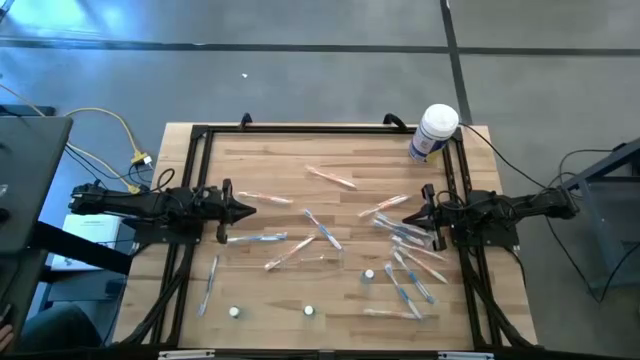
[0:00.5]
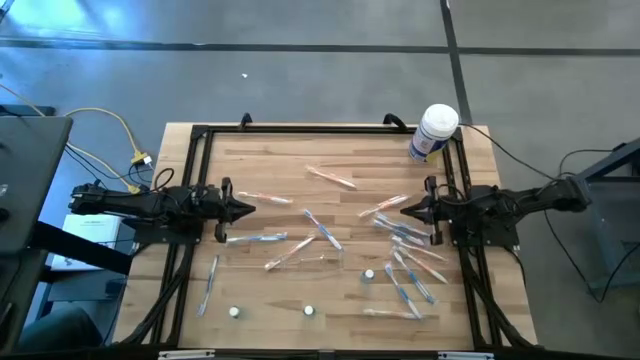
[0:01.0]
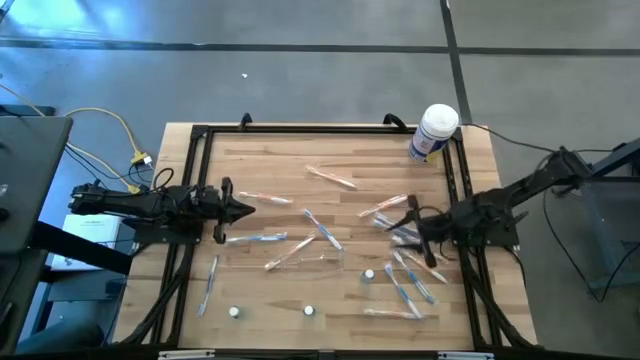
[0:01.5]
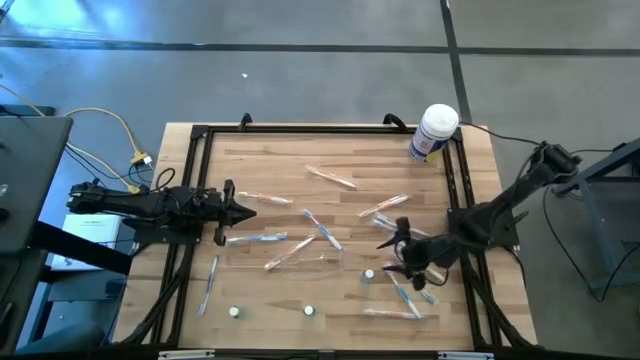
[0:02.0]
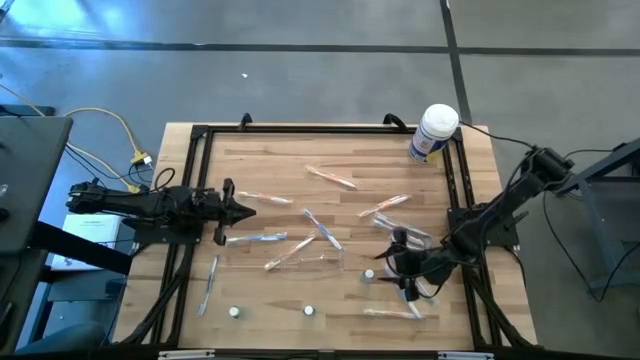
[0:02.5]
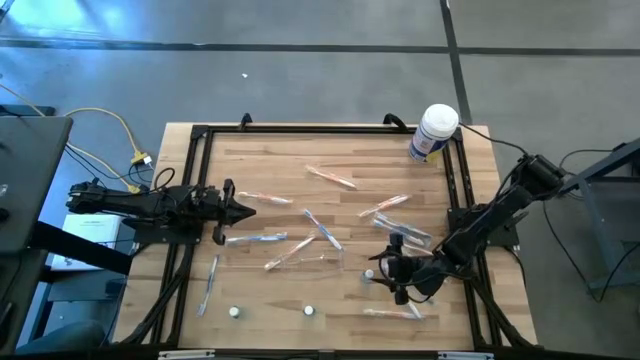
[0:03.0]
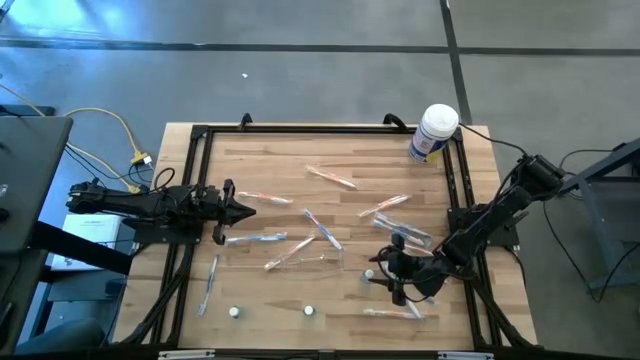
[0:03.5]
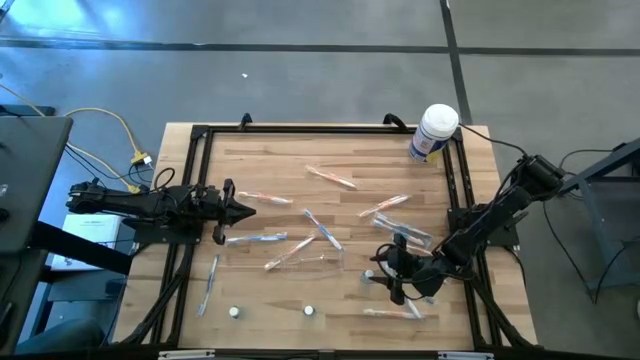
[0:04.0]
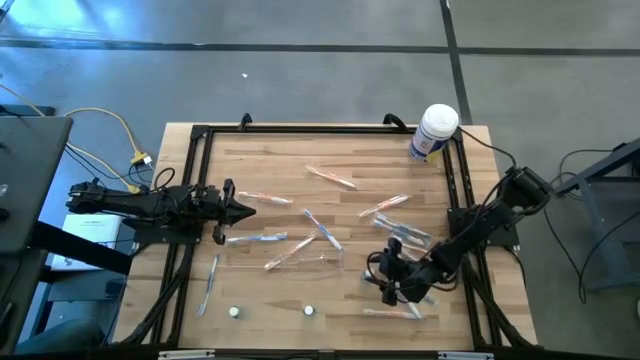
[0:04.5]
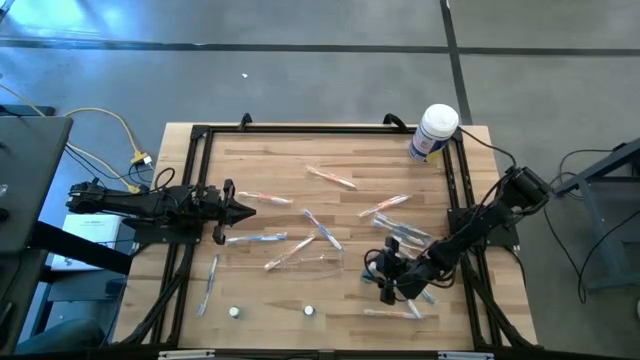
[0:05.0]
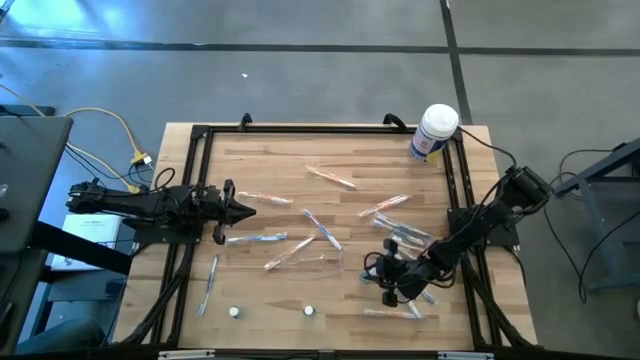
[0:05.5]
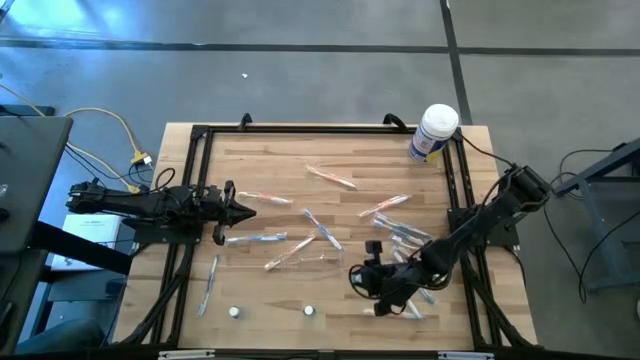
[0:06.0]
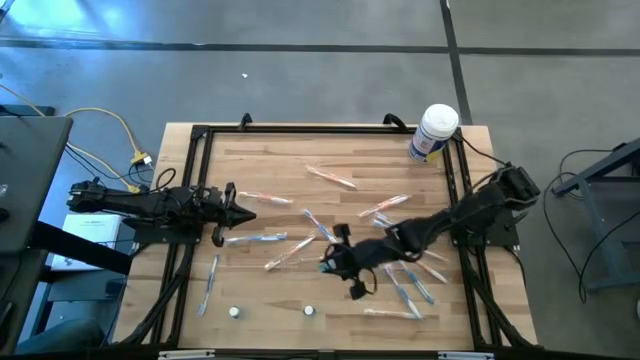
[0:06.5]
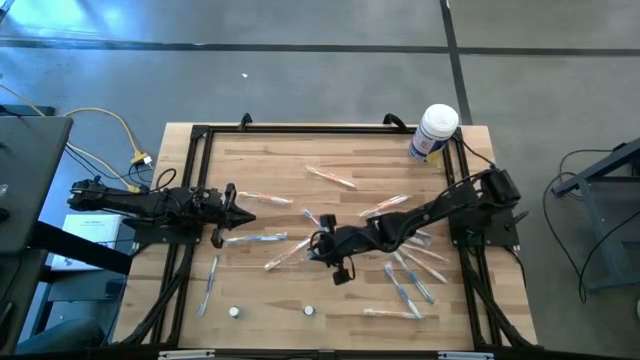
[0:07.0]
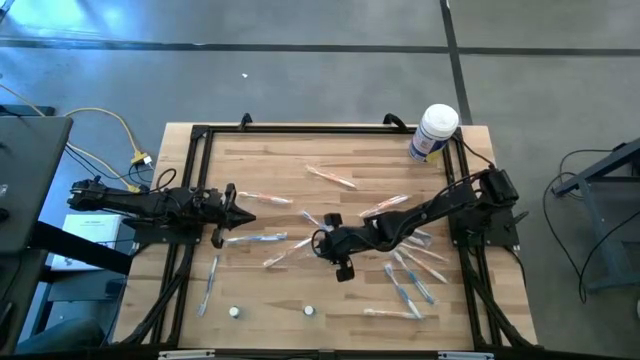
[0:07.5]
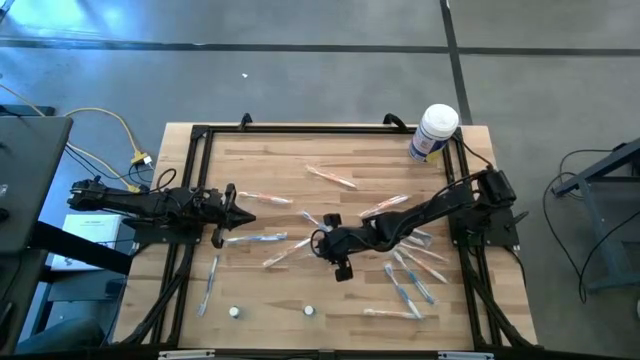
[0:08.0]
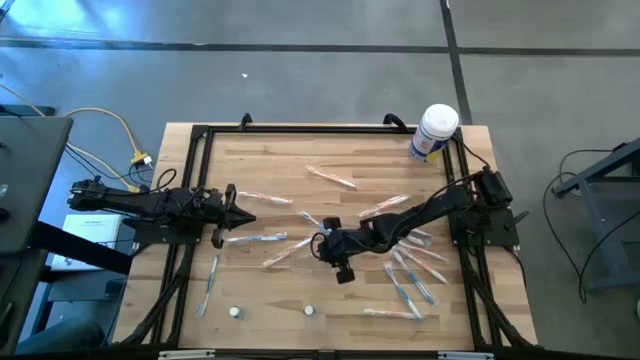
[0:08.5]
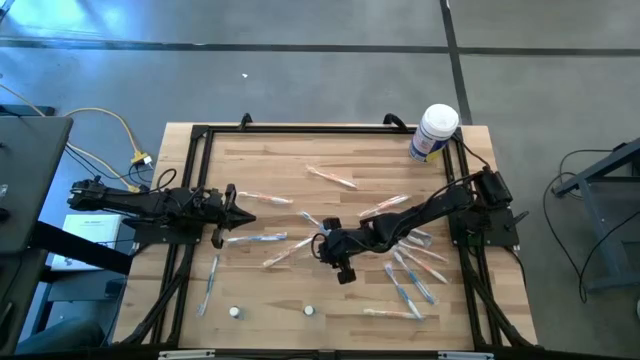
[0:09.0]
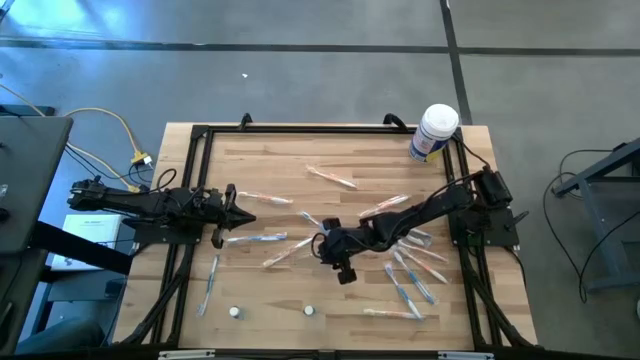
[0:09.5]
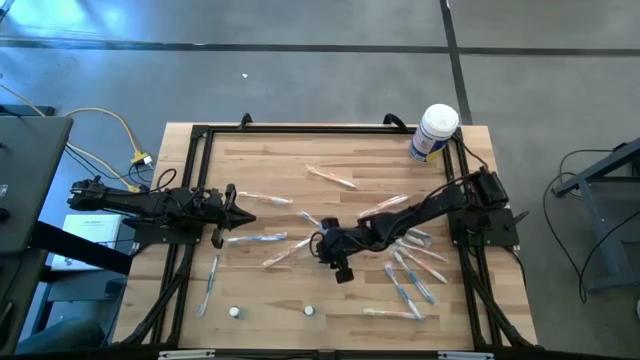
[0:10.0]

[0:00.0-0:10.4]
Task: Pick & Place toothbrushing station
Put the blue mouthwash into the transparent organizer

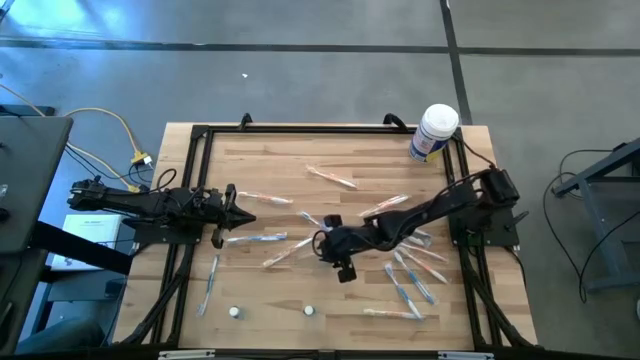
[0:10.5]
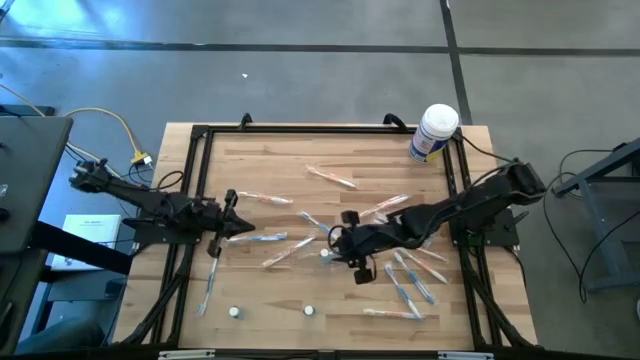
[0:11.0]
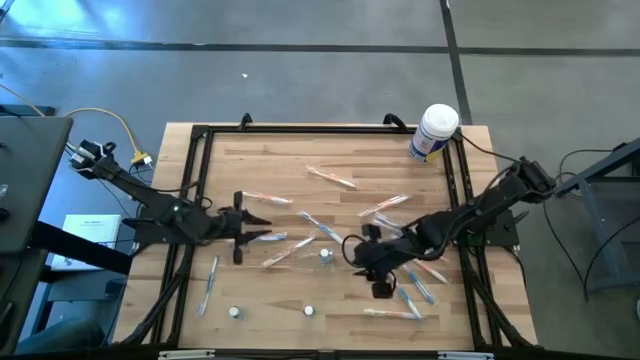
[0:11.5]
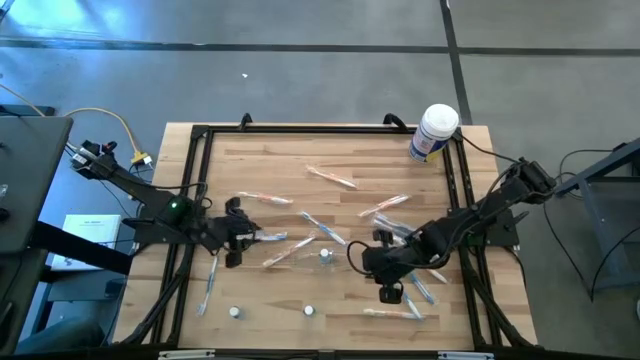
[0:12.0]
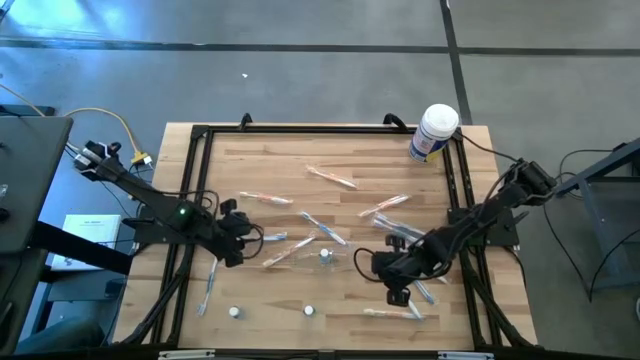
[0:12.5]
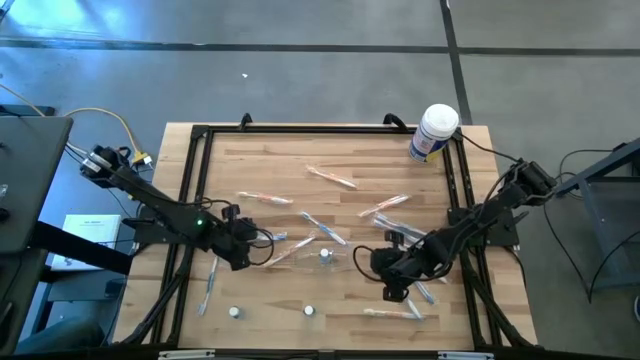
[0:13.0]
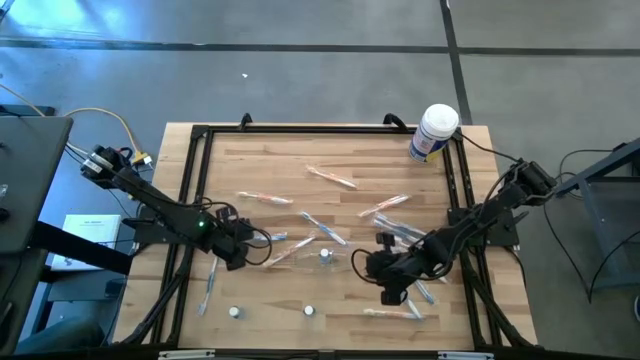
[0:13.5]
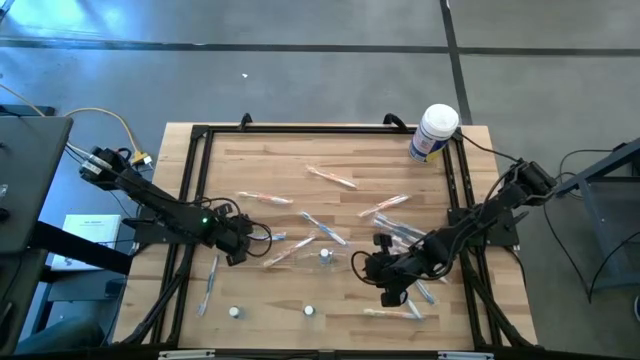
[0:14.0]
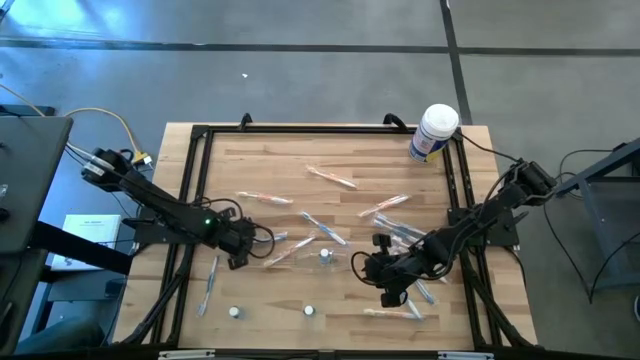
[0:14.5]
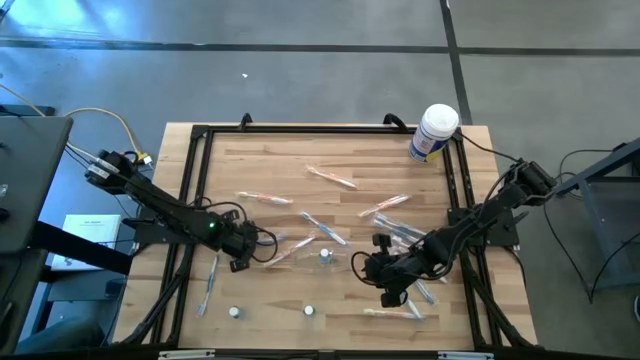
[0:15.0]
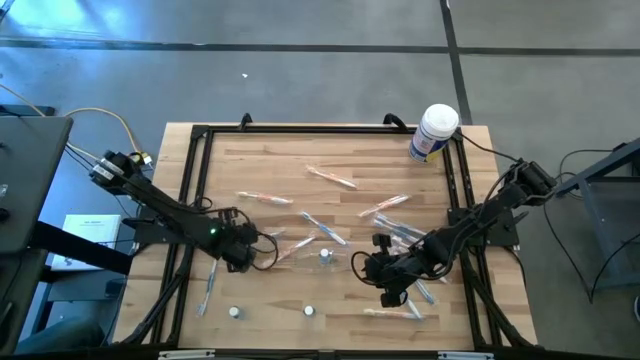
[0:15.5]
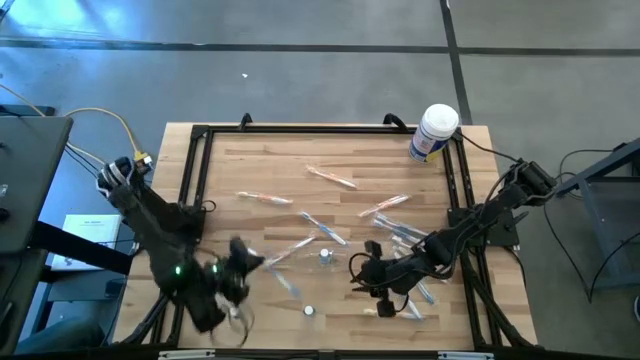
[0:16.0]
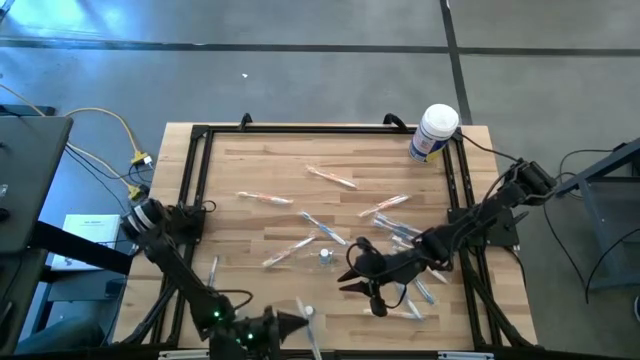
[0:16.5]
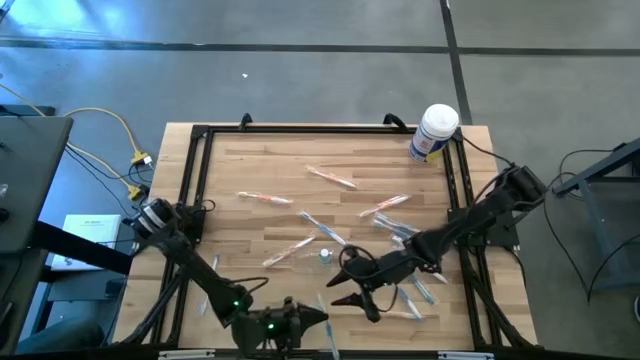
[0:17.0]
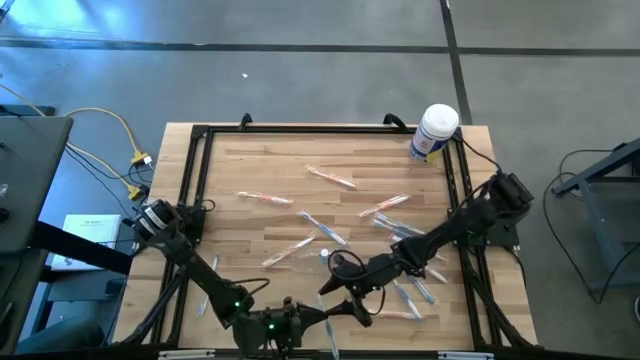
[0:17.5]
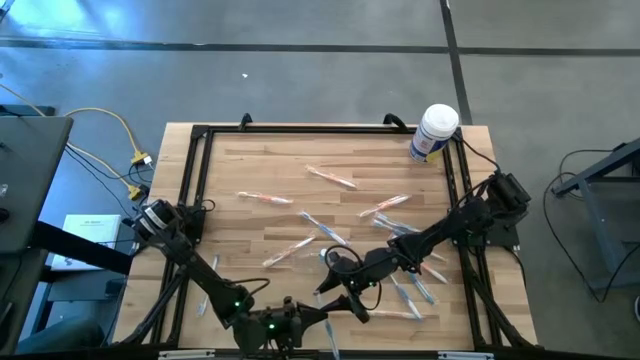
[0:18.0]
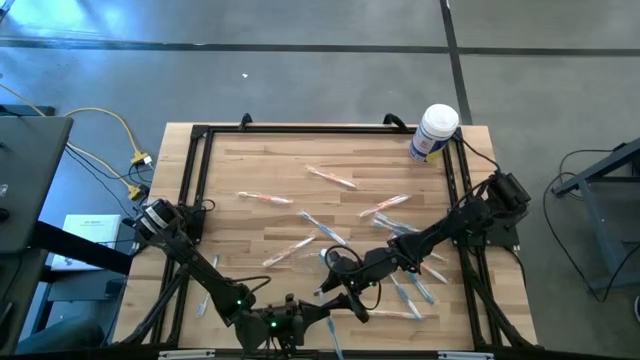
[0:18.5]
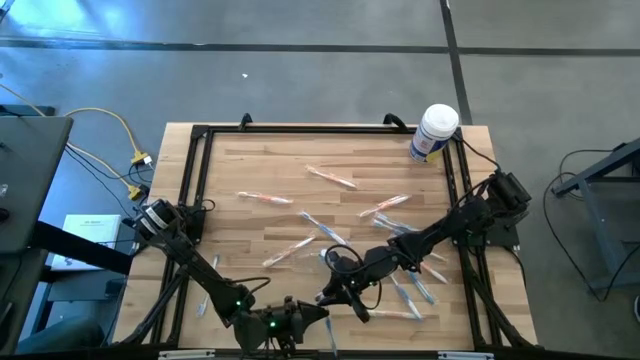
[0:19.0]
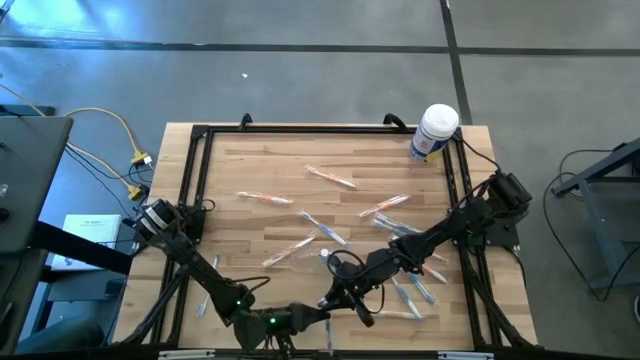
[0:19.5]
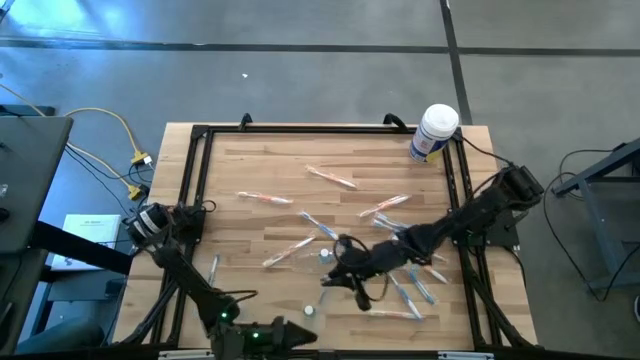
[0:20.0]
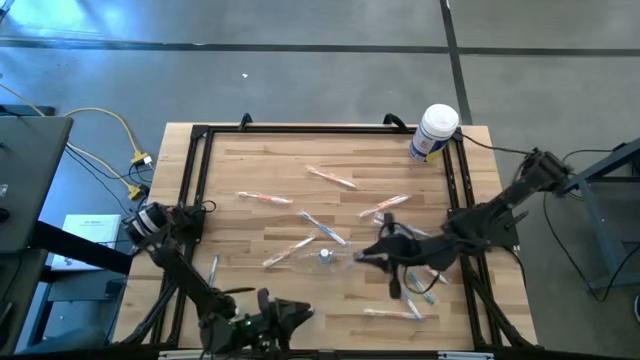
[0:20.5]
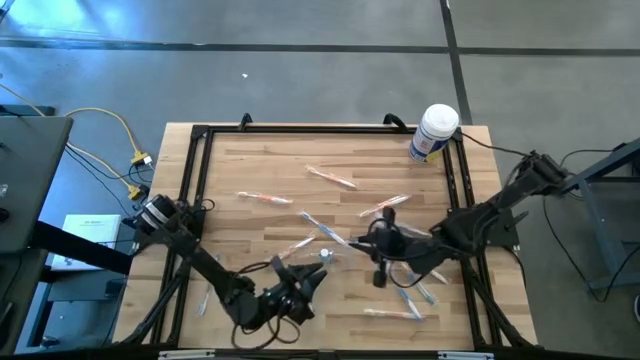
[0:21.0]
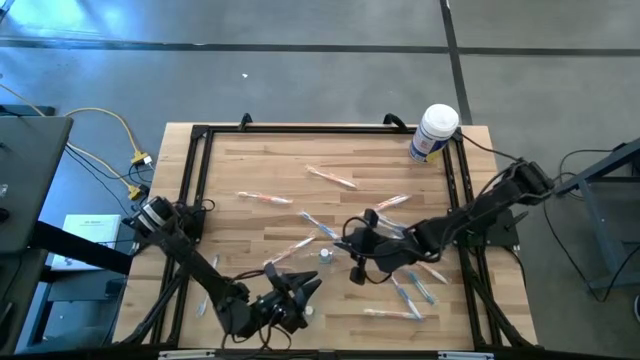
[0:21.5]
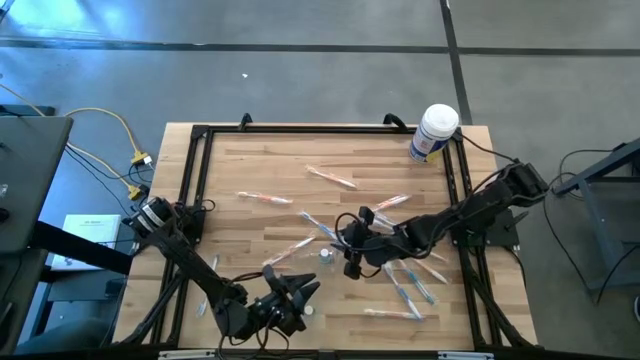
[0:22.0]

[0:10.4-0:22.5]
Put the blue toothbrush into the transparent organizer

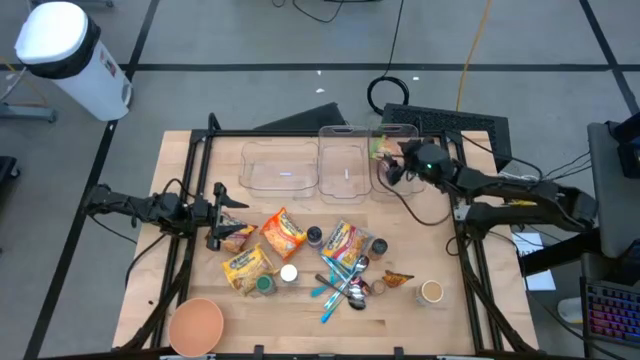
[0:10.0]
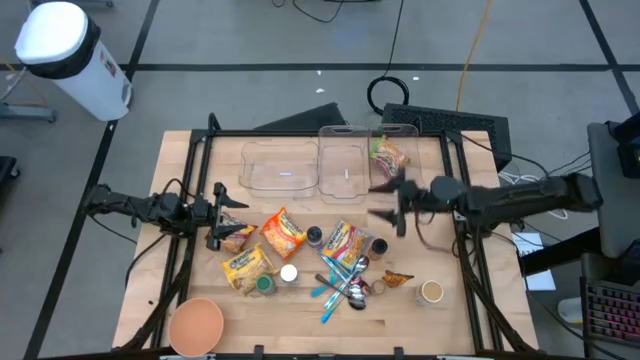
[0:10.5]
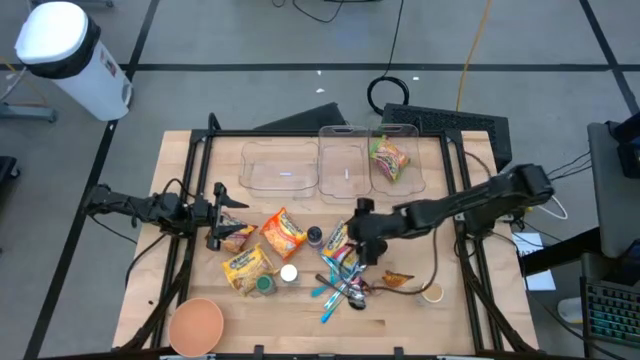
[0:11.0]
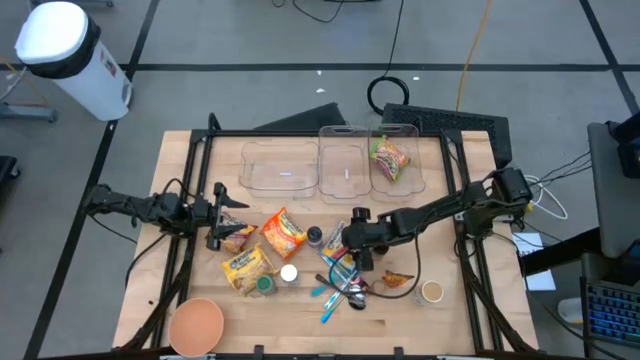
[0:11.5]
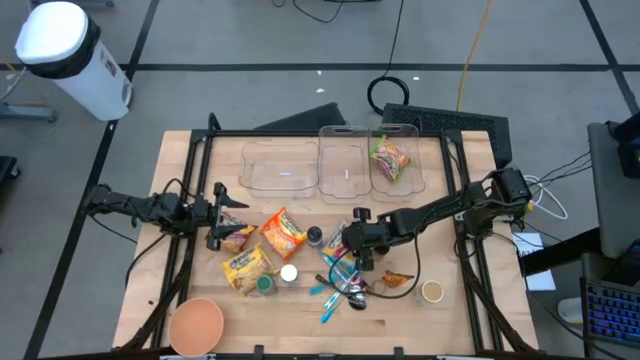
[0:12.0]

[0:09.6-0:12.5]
Task: Pick & Place Food Item
Put the blue noodle pack into the right transparent bin
